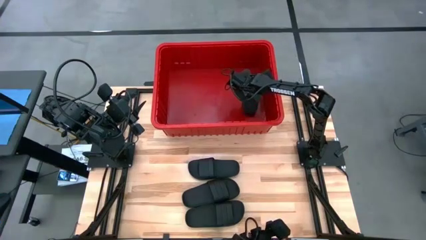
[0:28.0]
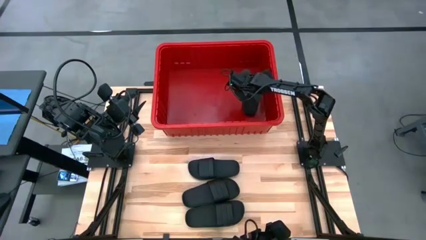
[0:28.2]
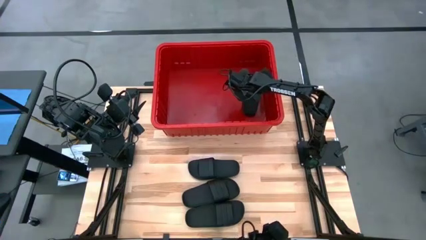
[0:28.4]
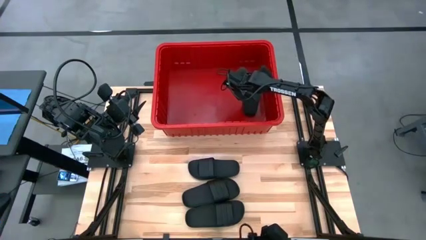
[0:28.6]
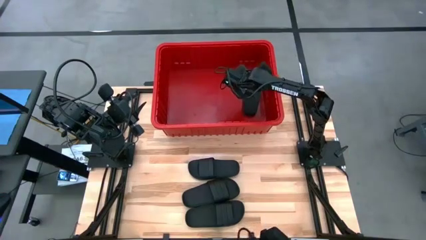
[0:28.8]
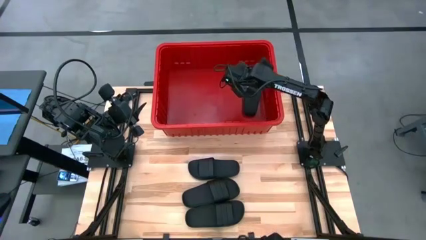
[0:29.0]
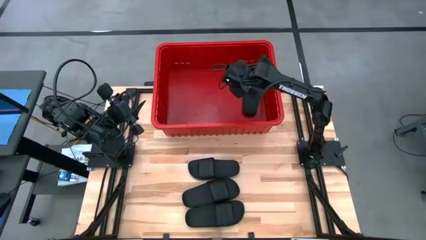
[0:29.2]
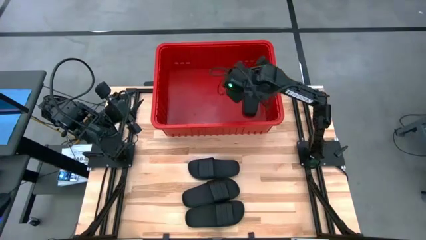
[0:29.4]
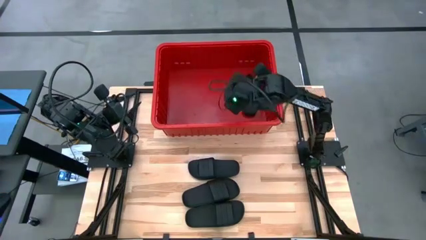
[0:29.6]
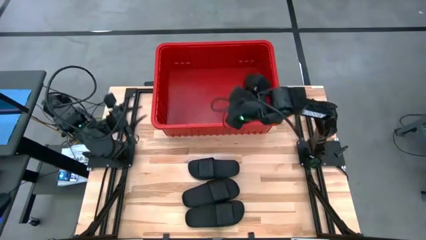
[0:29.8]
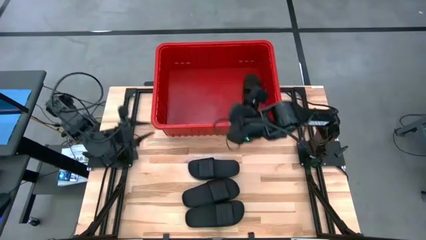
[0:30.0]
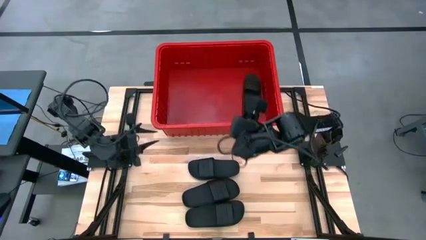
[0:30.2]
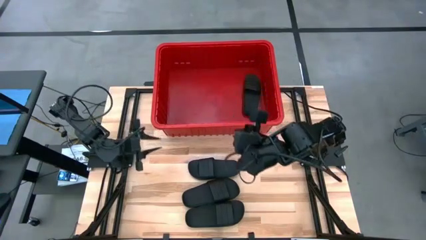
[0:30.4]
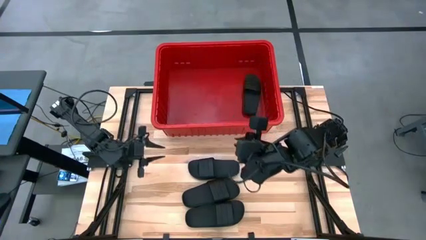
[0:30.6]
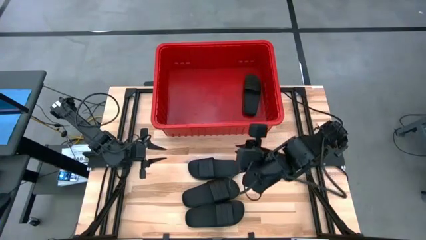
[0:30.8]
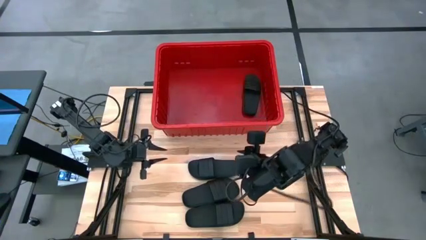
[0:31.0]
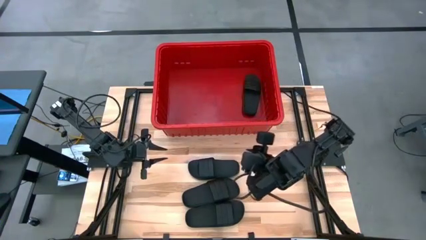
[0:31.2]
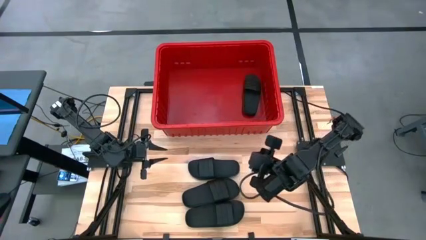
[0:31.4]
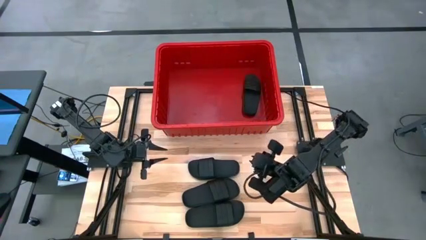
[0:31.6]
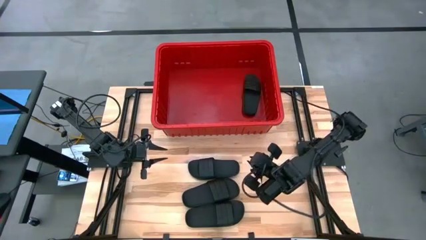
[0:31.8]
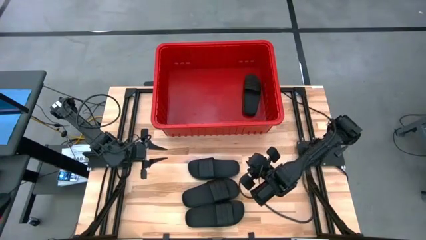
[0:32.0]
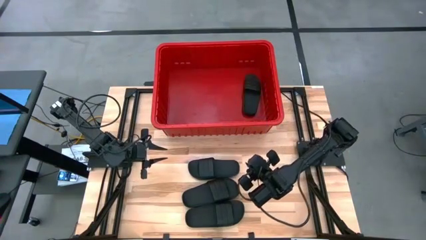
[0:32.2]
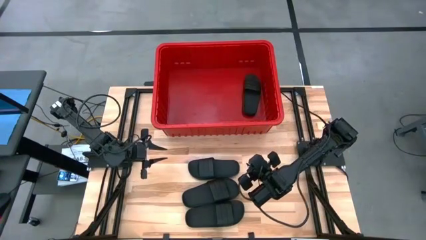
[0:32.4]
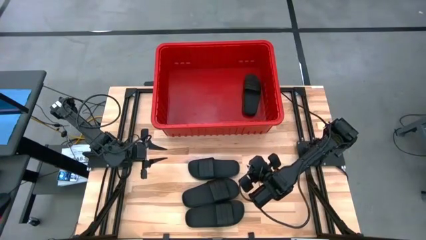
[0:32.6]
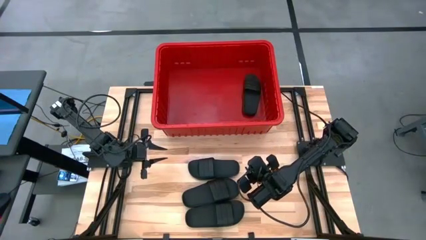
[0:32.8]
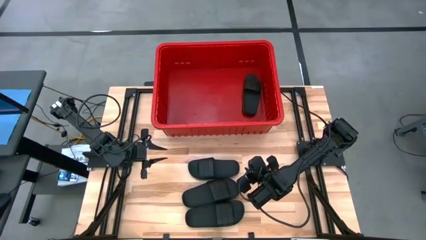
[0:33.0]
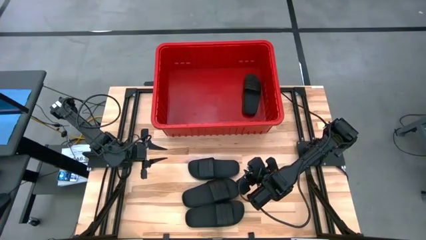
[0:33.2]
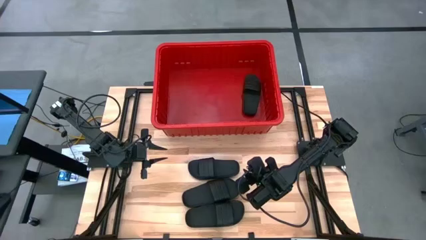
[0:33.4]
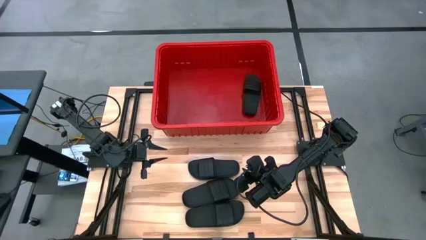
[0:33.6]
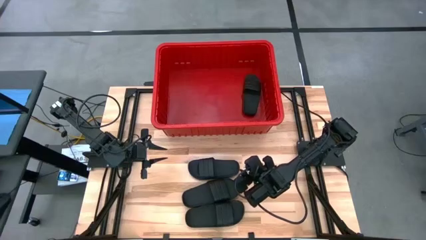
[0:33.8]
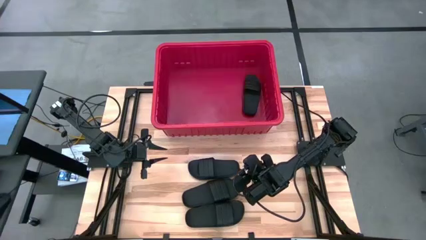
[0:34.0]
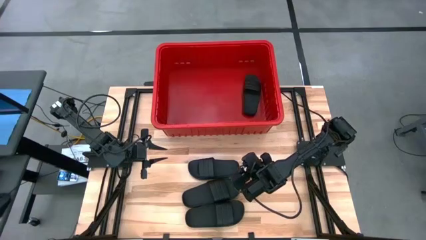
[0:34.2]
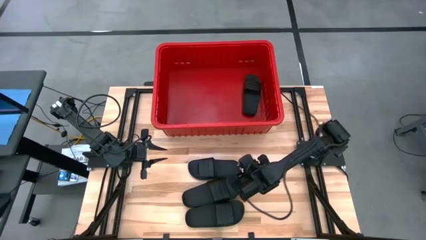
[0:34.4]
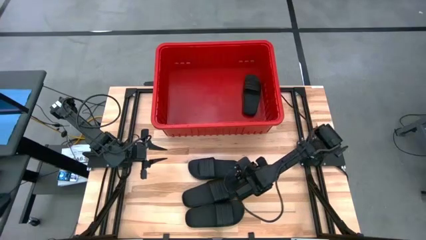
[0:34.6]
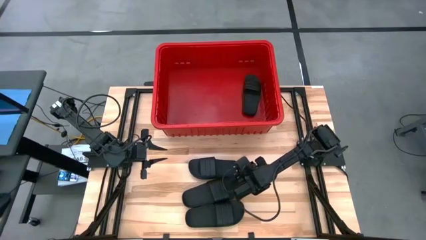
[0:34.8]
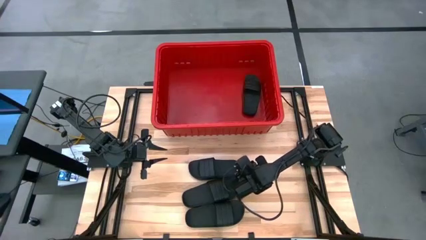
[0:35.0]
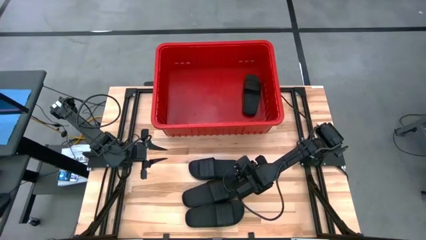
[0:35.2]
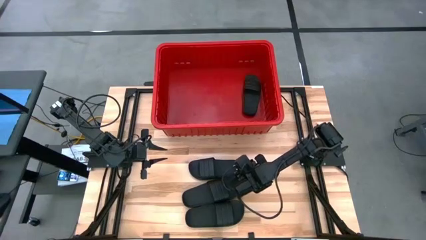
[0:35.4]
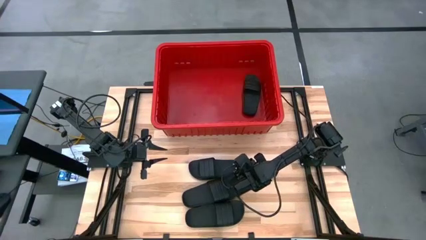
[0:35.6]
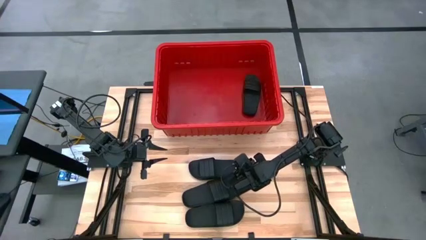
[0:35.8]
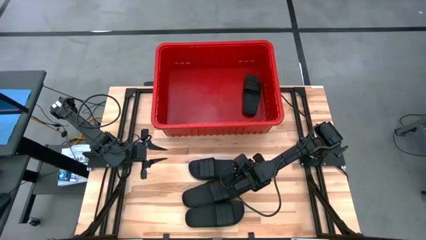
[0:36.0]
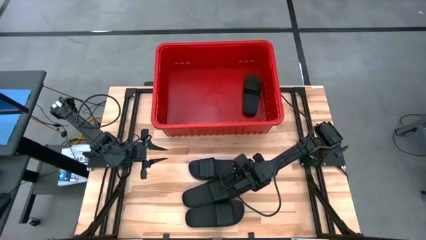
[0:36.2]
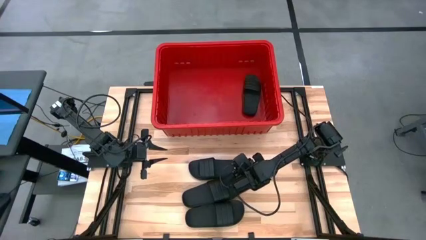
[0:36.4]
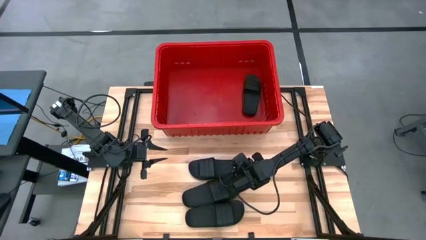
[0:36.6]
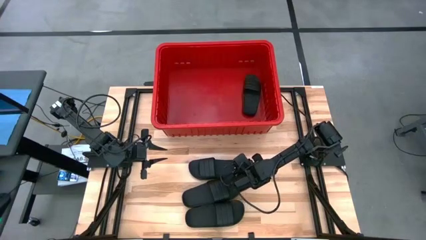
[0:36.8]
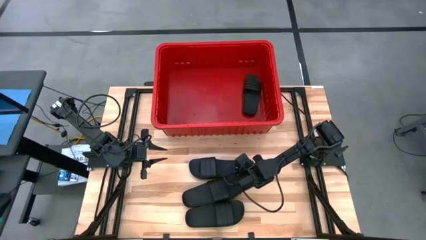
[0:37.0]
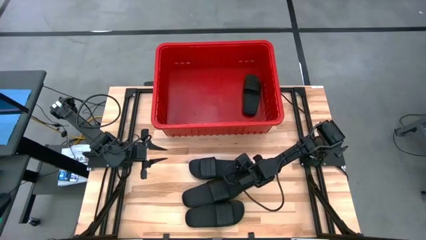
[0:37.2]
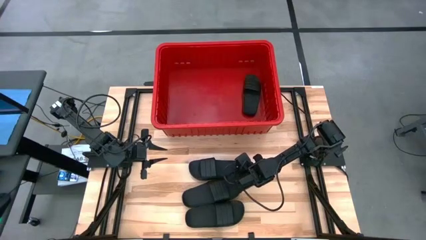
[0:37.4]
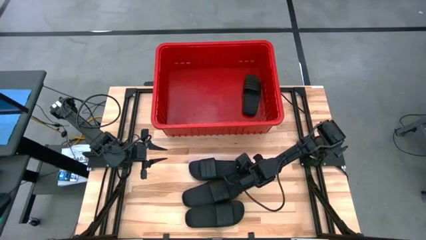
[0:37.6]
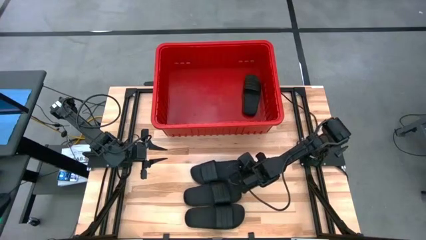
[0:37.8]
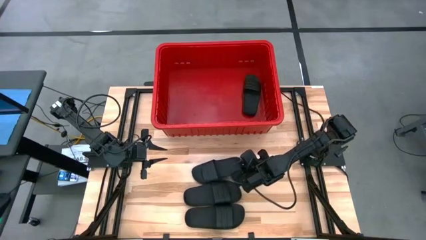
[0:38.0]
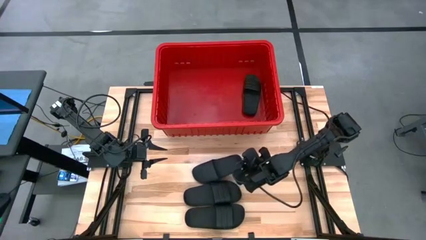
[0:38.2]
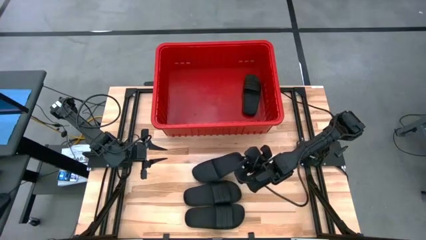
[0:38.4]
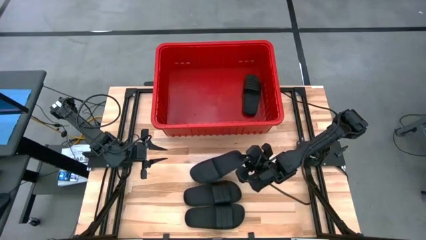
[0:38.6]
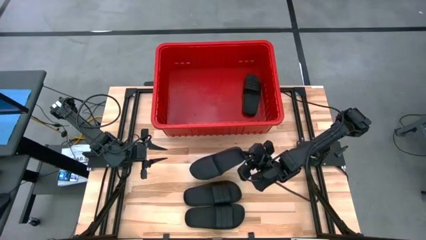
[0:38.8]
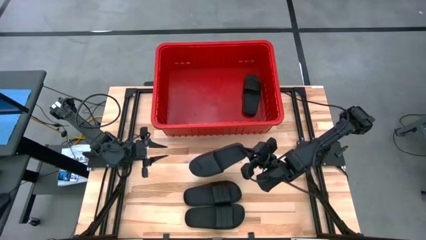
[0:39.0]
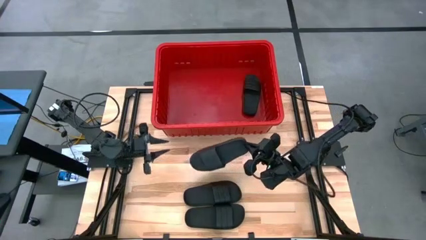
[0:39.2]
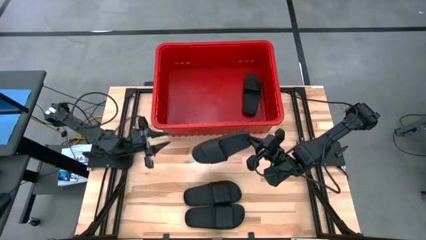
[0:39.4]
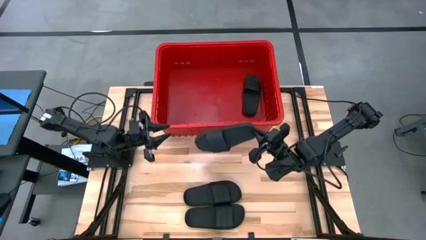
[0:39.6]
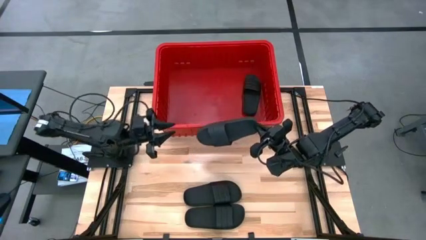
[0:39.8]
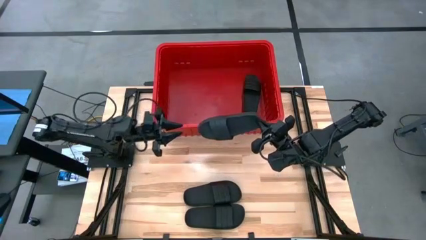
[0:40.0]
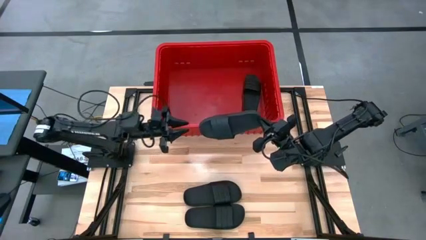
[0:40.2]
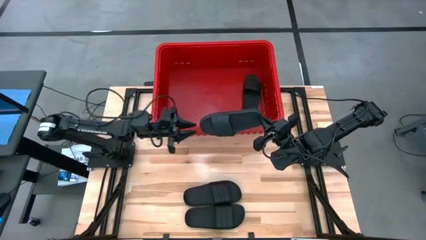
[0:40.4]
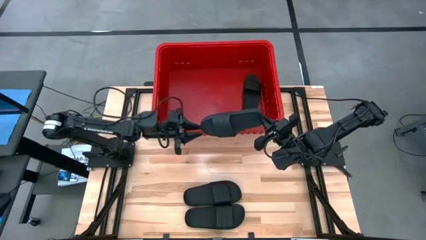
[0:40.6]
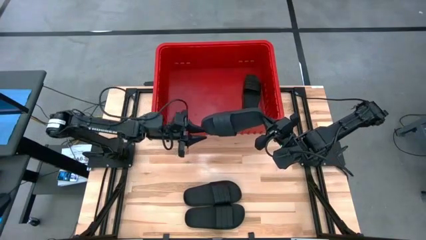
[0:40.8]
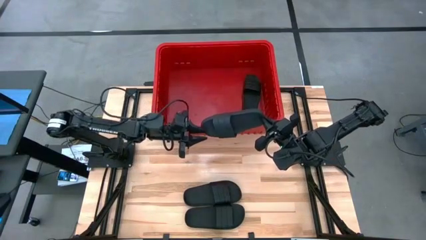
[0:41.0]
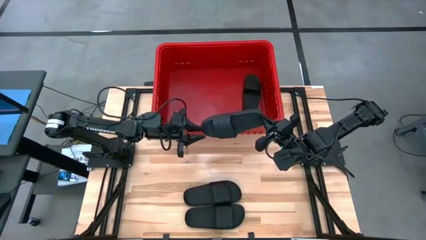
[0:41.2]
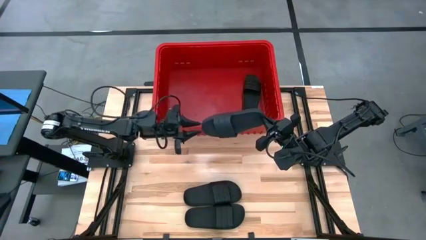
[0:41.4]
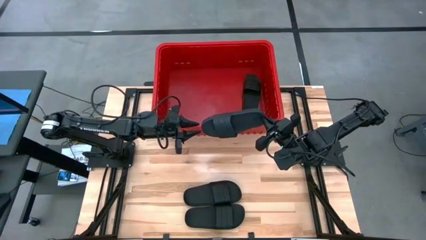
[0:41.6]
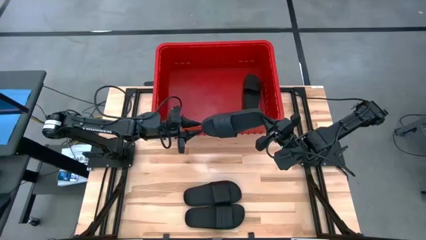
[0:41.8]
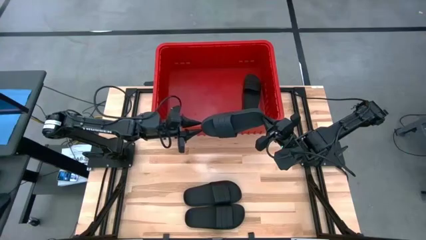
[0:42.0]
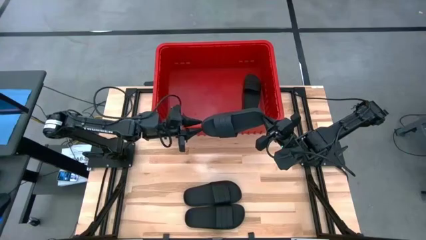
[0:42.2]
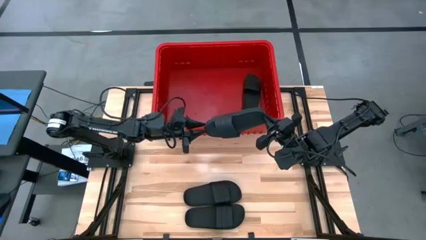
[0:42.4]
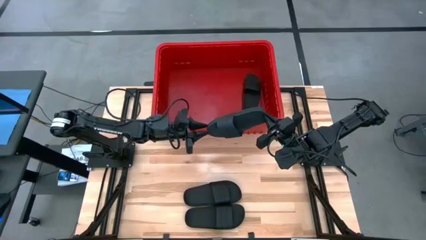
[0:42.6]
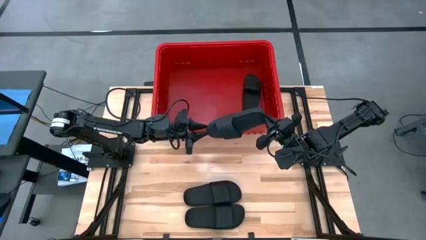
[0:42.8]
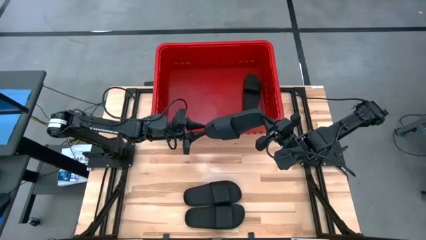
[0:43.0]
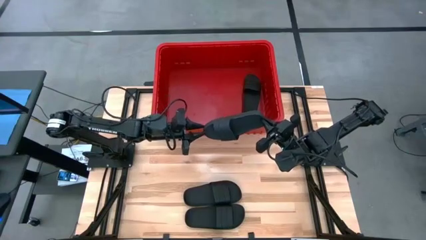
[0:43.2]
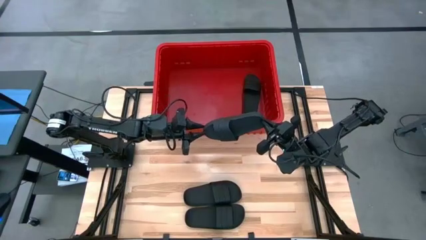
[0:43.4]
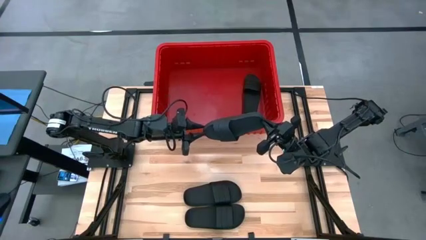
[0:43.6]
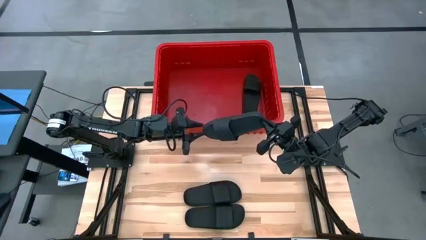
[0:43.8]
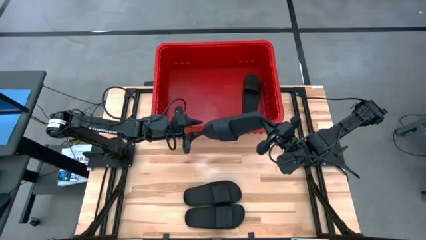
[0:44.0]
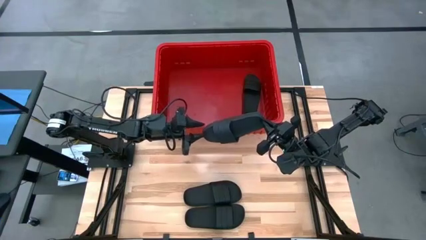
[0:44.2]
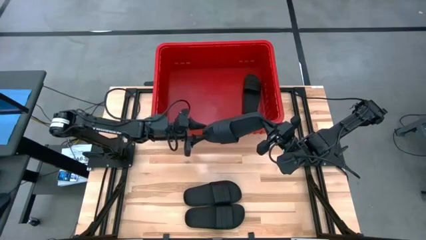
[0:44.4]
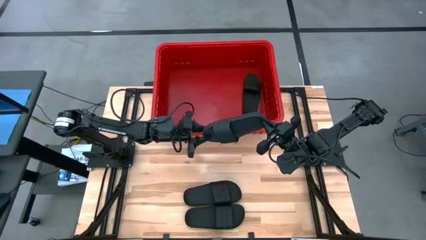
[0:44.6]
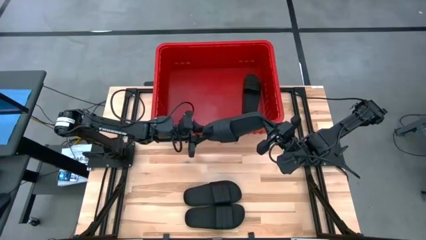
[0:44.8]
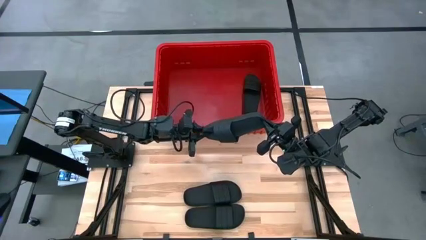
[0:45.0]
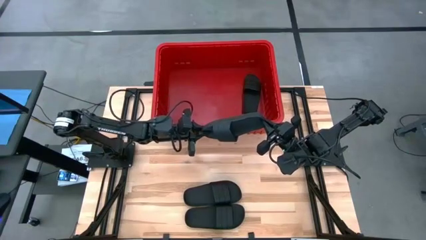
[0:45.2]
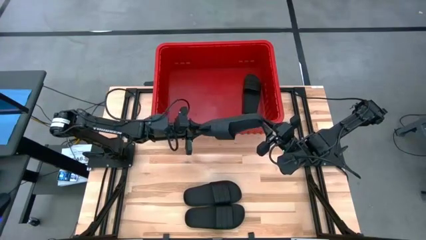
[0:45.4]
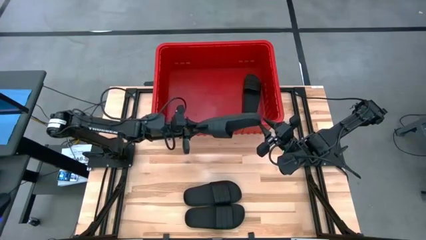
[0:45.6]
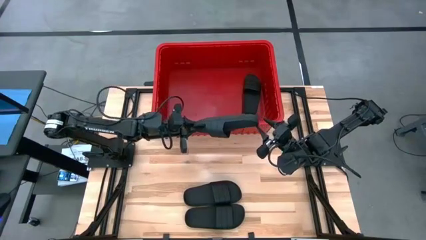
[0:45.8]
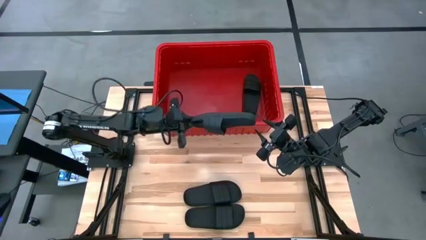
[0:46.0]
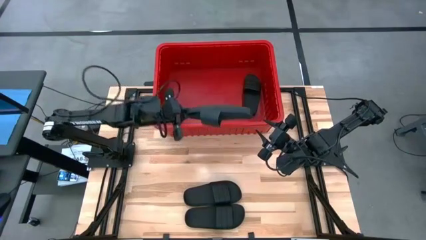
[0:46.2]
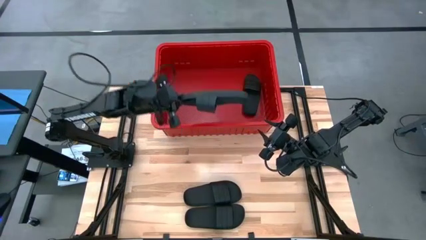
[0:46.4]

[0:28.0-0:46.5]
Task: Pick and place slides into bin
Put the black slide into the container
